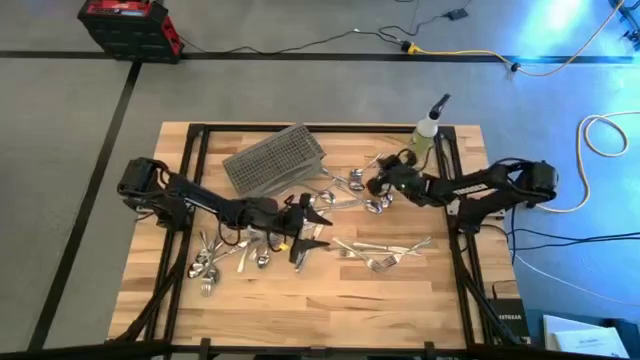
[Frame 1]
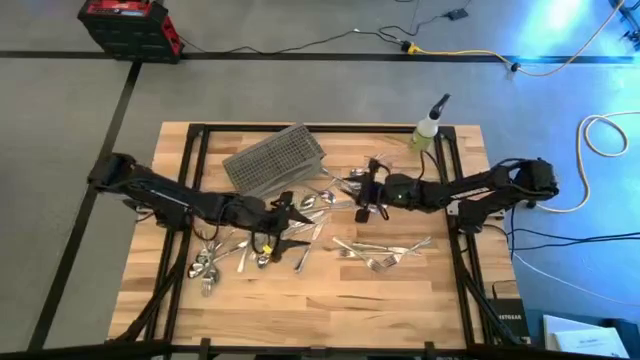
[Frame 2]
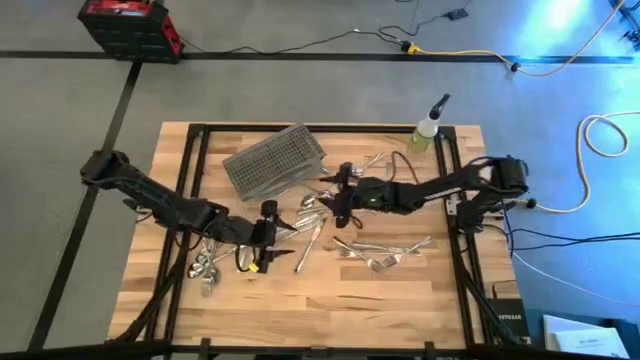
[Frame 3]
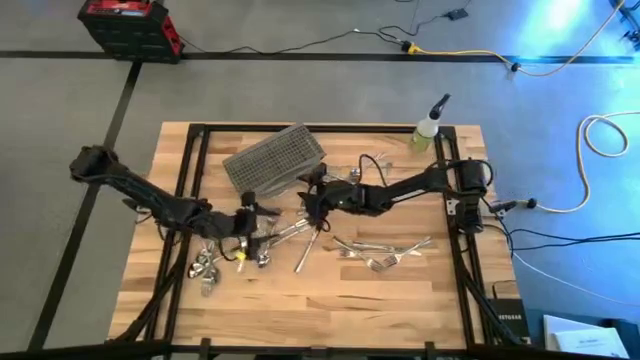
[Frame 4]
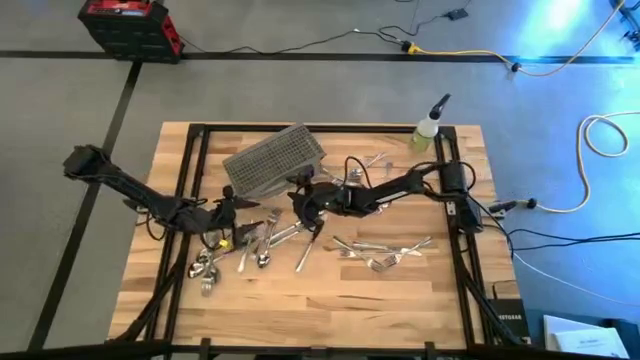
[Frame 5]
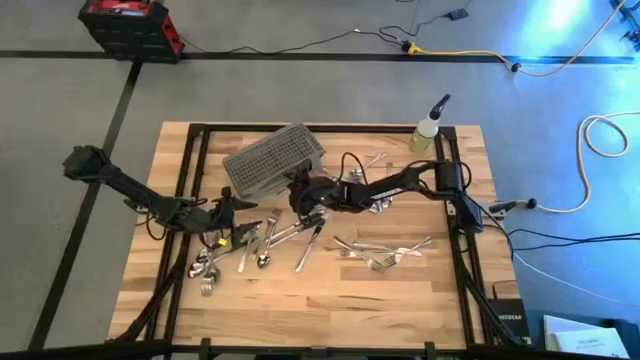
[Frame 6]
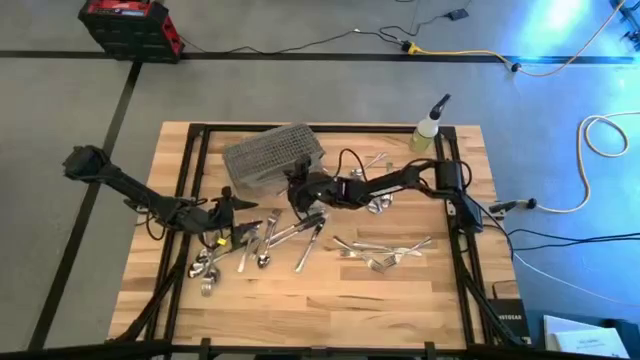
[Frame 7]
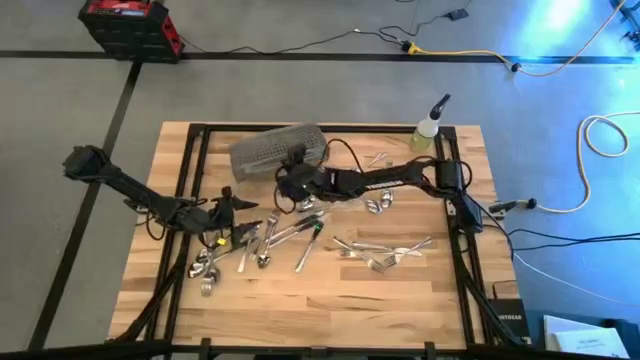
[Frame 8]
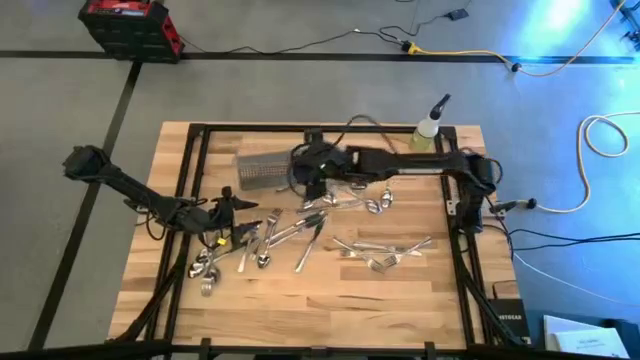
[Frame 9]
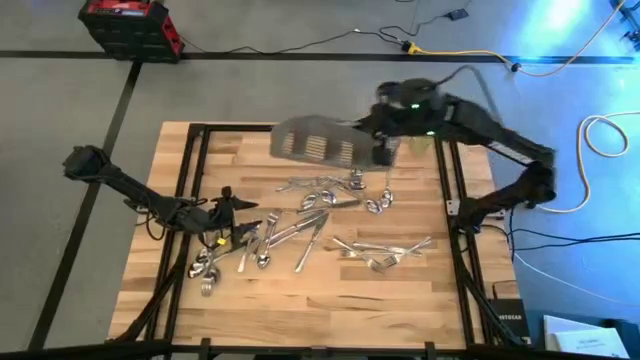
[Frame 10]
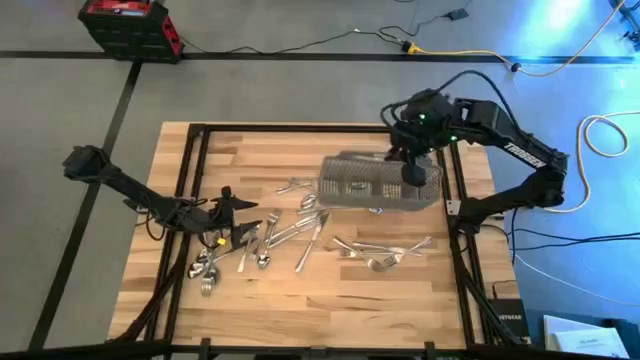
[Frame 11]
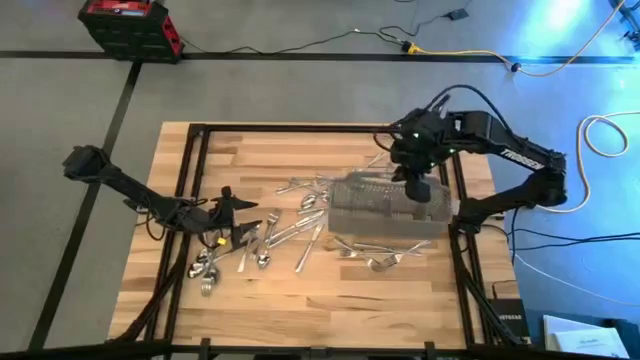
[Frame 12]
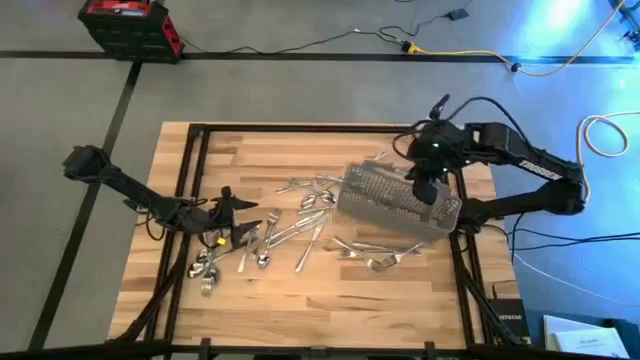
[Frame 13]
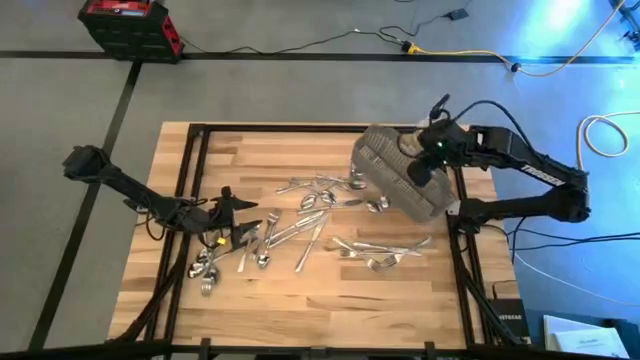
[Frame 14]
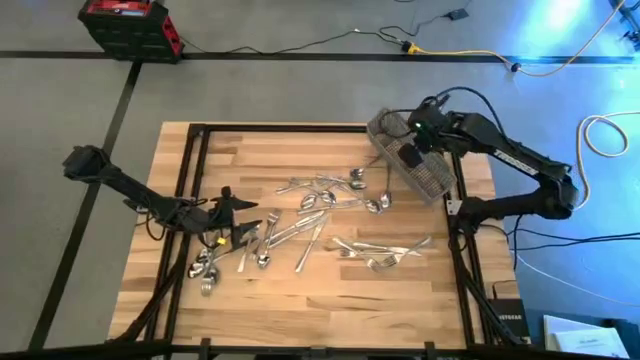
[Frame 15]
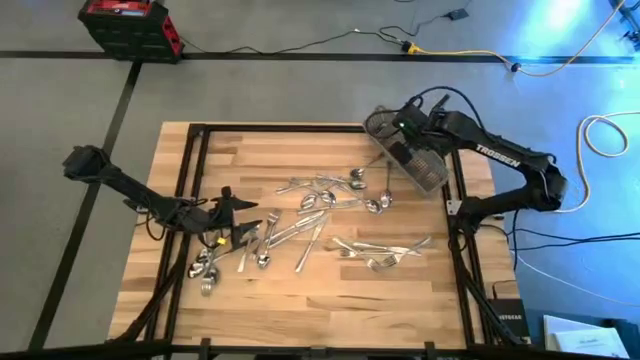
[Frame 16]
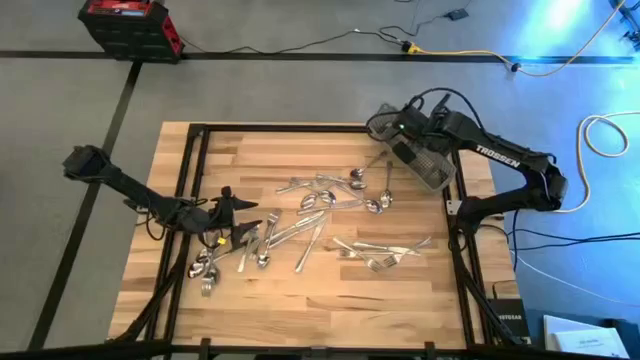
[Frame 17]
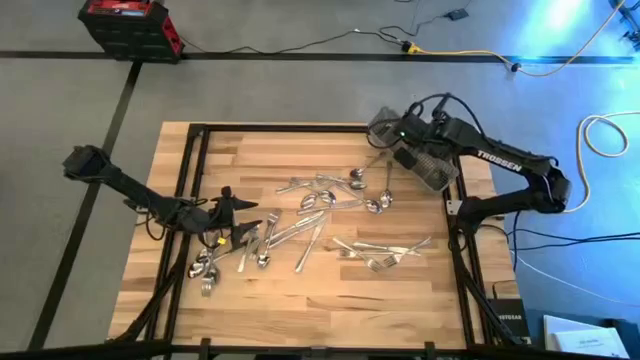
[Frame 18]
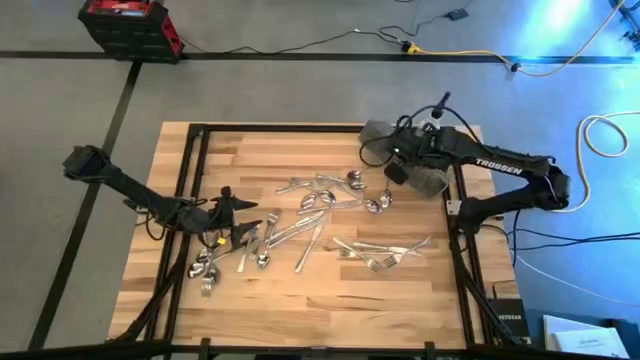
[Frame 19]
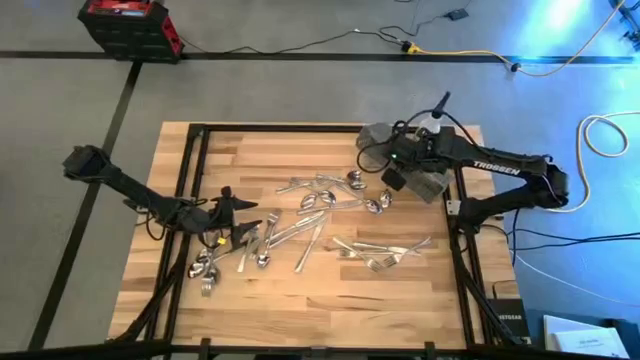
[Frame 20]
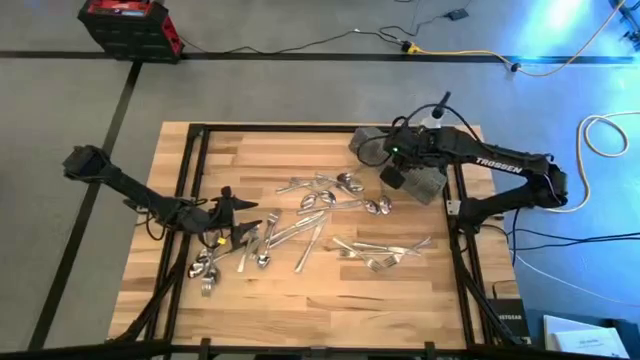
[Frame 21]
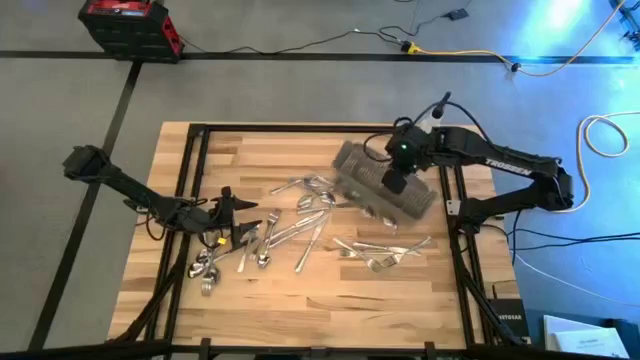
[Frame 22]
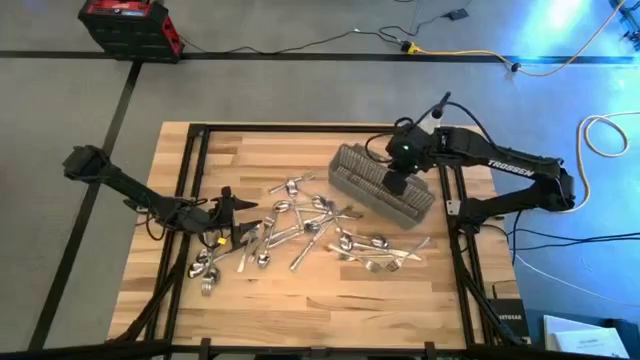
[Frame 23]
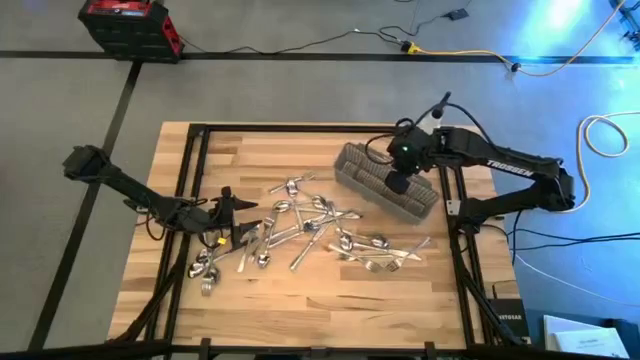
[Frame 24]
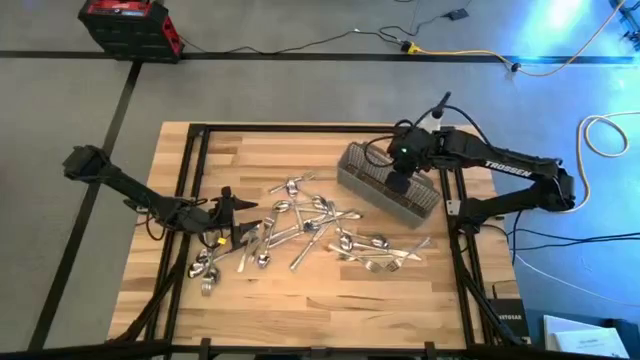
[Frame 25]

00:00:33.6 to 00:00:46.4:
Task: Sort silverware
Move the gray silverware organizer to the middle right of the table

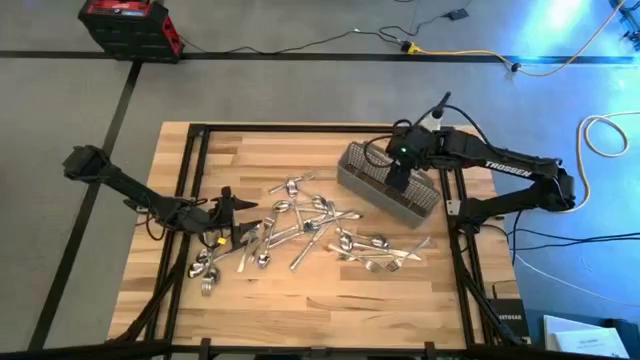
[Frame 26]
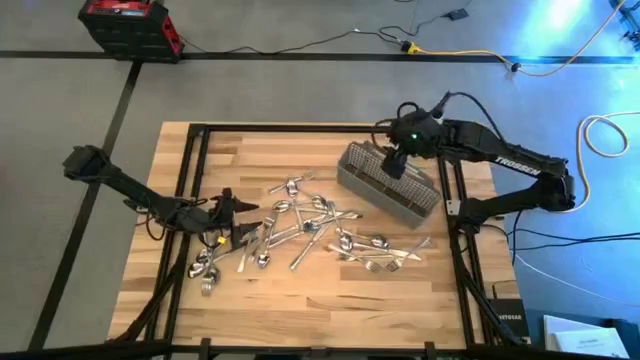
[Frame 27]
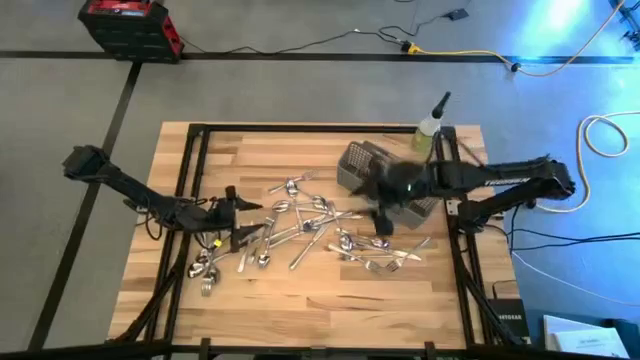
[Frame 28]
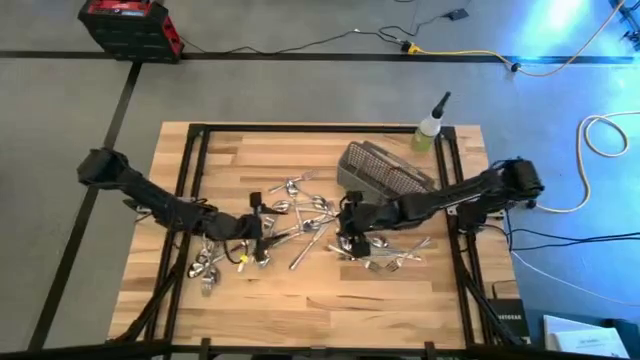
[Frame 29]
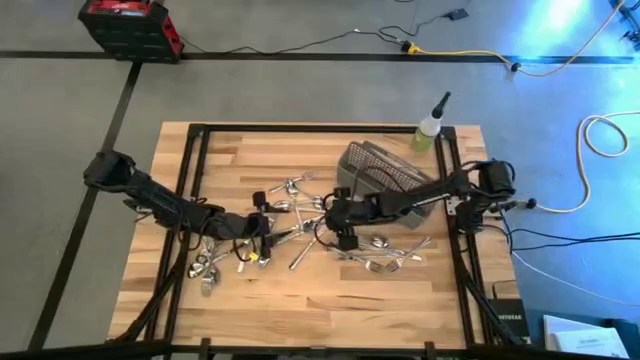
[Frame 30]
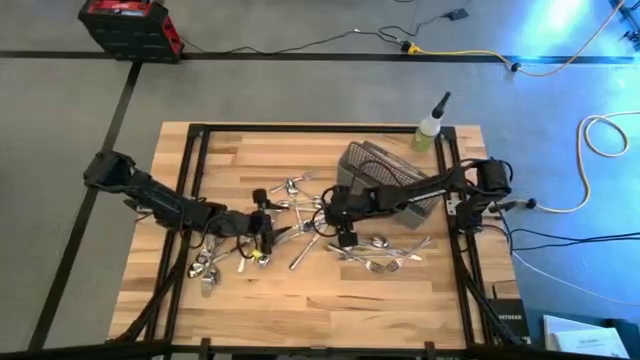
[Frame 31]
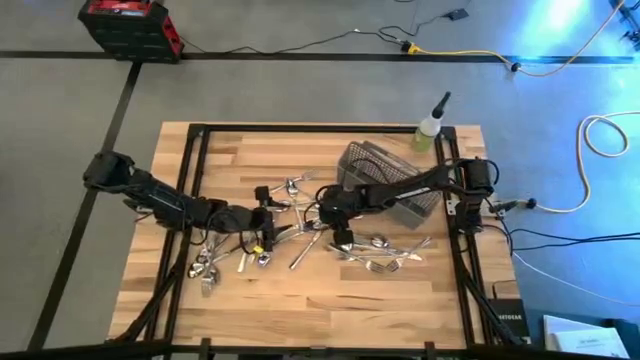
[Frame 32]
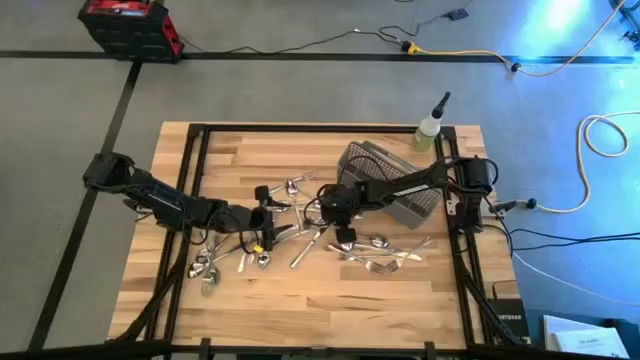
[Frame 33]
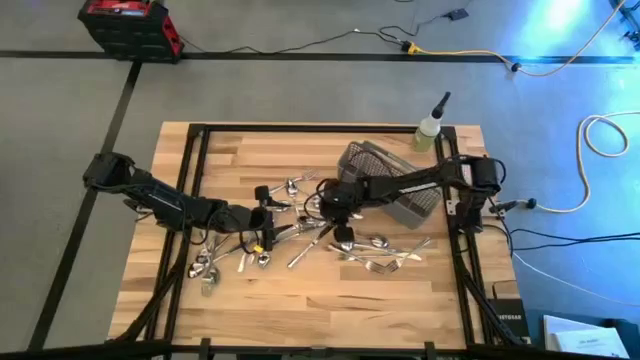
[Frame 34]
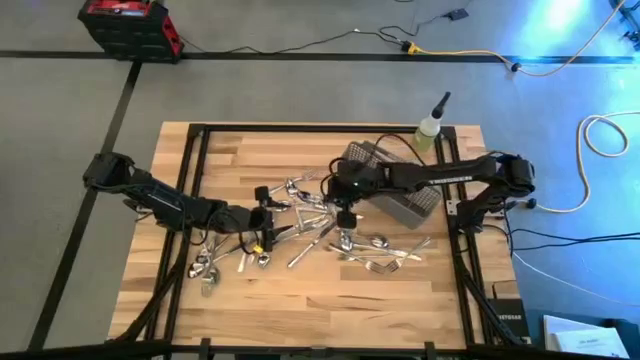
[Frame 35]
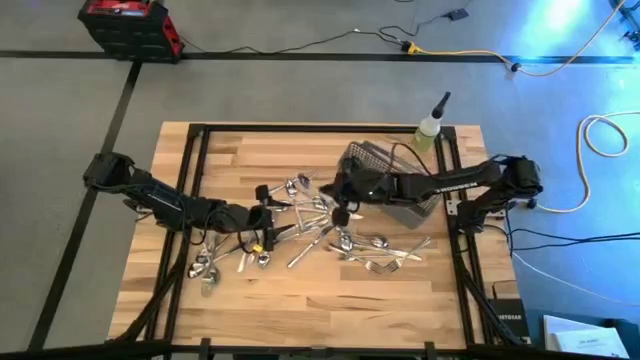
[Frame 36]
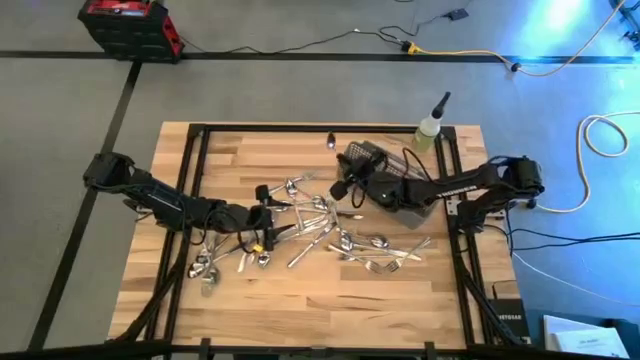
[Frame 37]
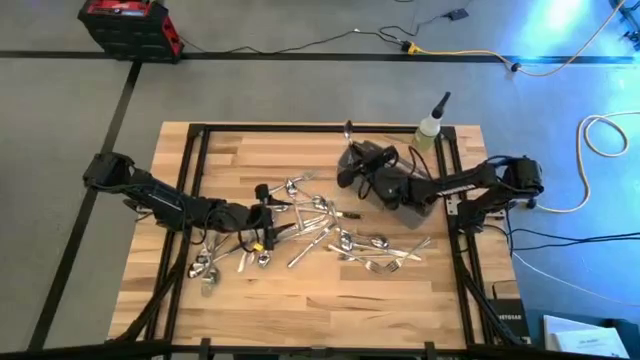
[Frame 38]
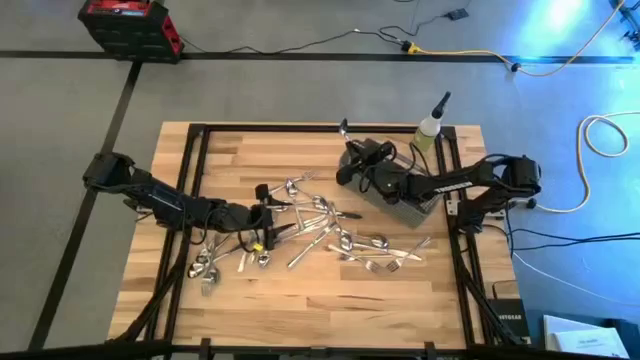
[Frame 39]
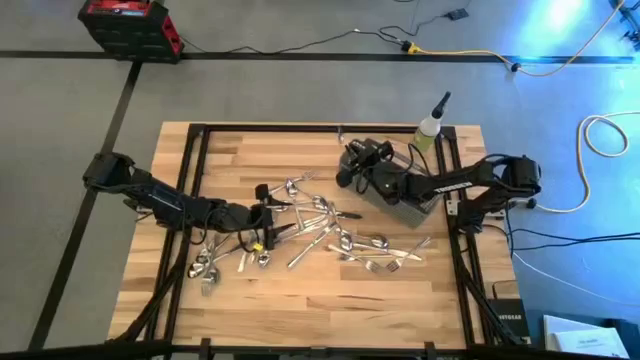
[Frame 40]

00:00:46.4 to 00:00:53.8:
Put the silver spoon into the gray silverware organizer
